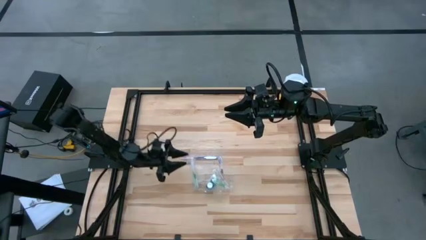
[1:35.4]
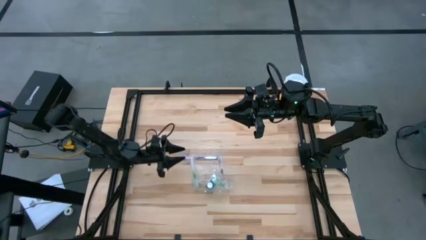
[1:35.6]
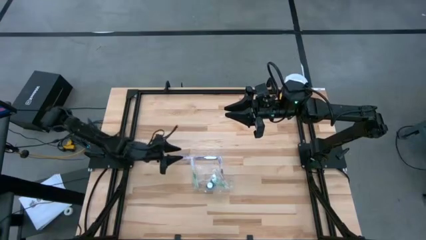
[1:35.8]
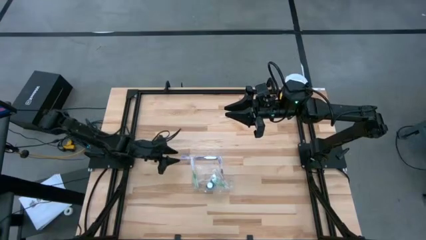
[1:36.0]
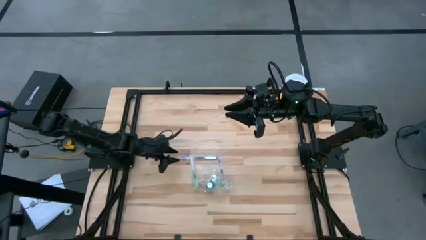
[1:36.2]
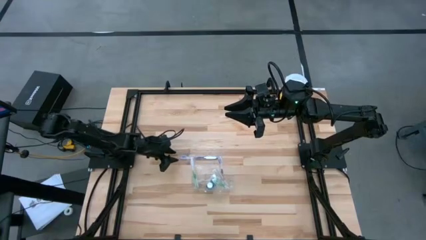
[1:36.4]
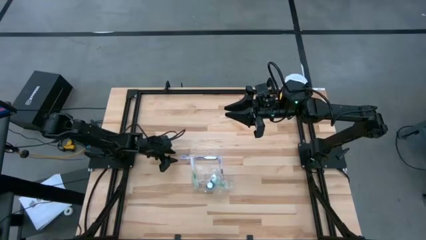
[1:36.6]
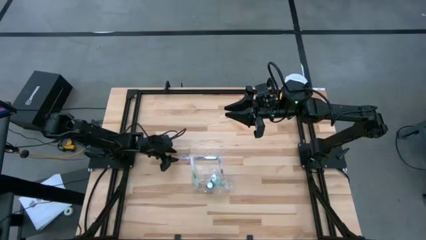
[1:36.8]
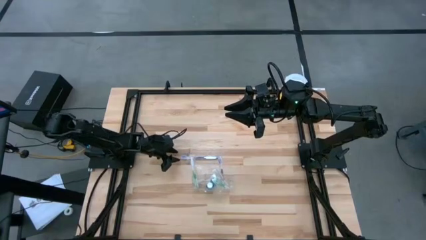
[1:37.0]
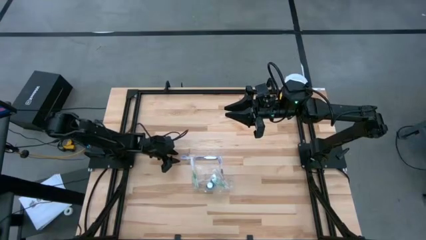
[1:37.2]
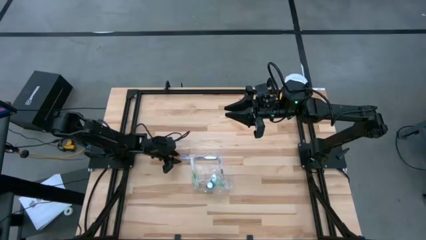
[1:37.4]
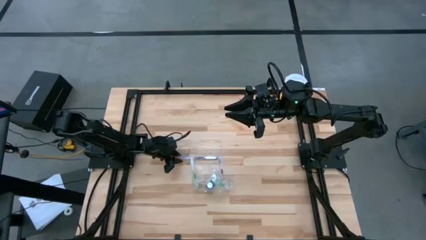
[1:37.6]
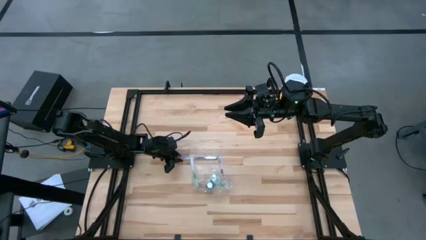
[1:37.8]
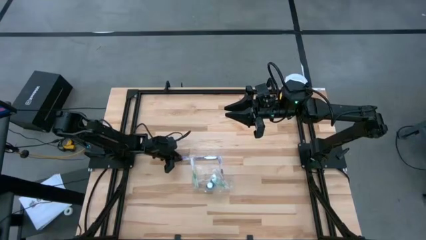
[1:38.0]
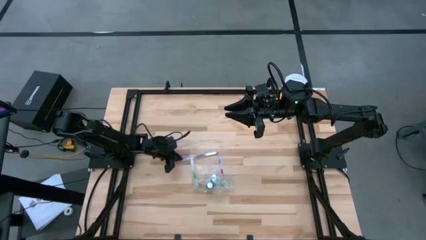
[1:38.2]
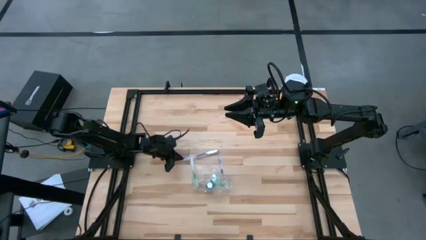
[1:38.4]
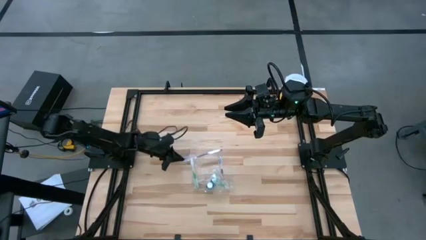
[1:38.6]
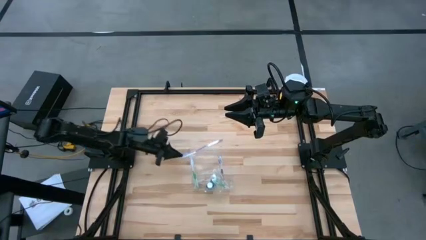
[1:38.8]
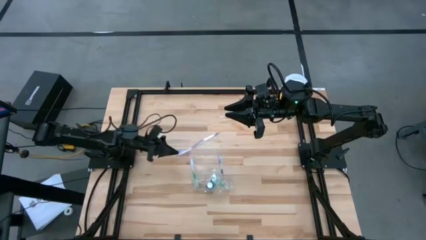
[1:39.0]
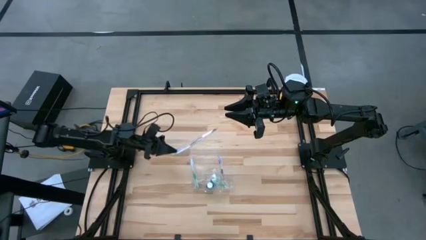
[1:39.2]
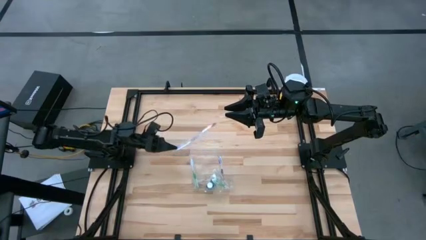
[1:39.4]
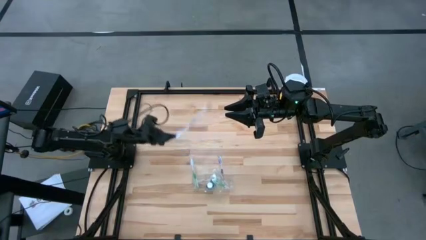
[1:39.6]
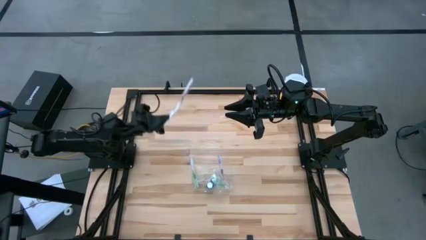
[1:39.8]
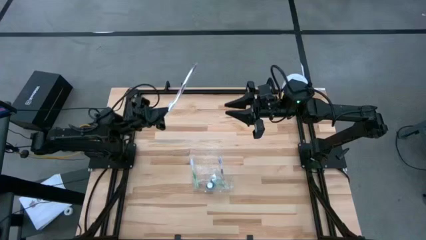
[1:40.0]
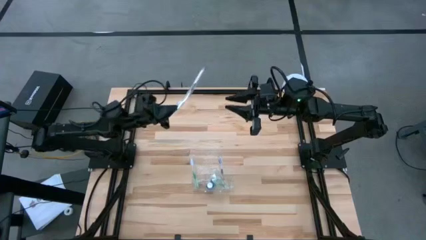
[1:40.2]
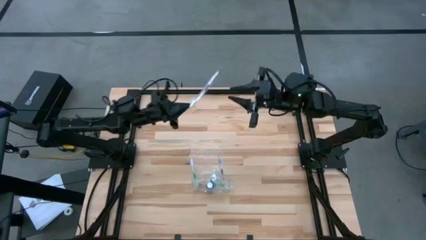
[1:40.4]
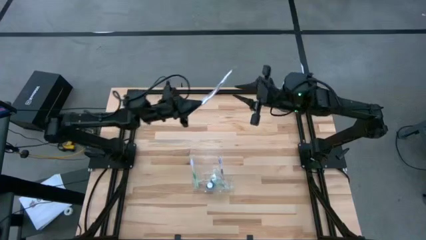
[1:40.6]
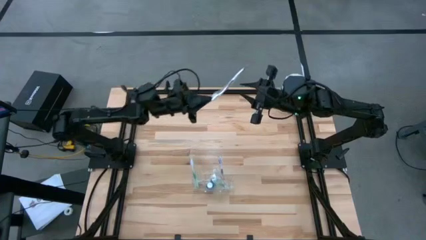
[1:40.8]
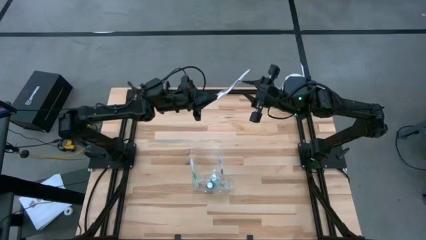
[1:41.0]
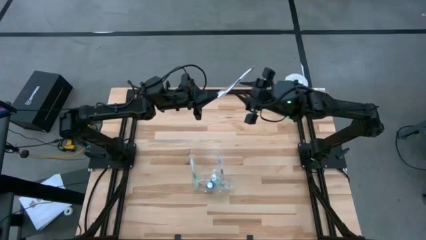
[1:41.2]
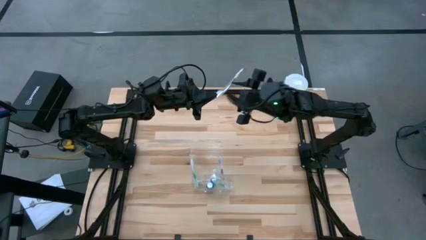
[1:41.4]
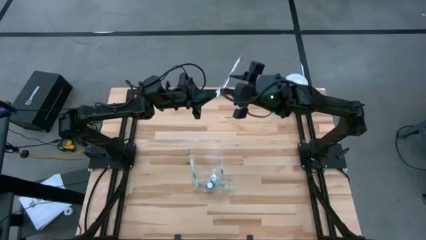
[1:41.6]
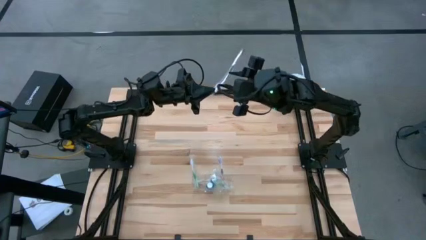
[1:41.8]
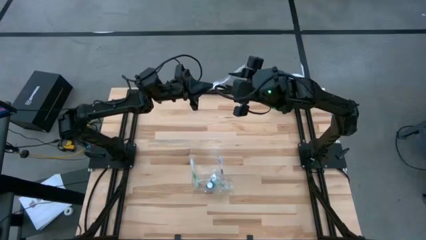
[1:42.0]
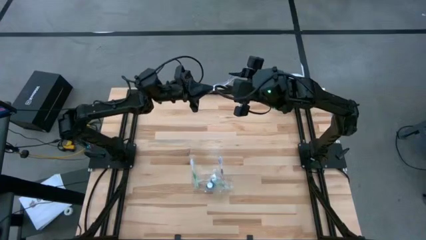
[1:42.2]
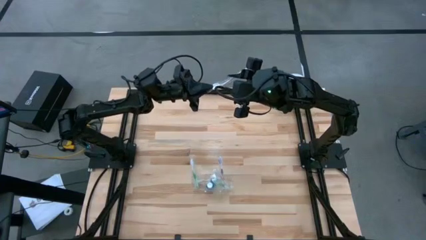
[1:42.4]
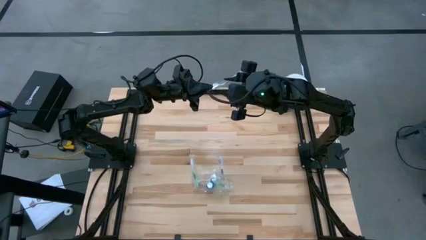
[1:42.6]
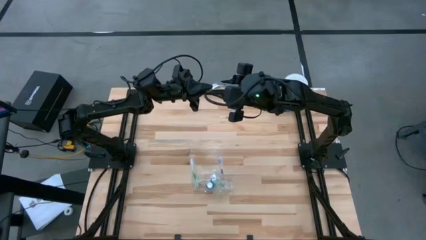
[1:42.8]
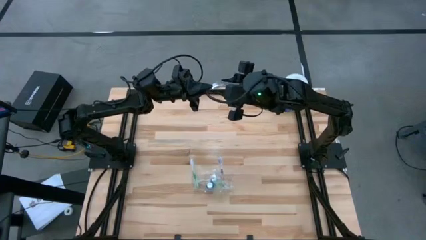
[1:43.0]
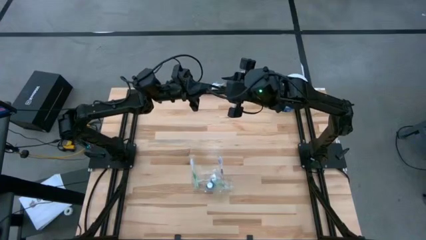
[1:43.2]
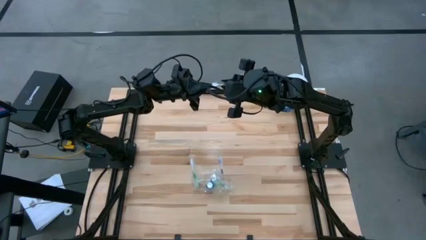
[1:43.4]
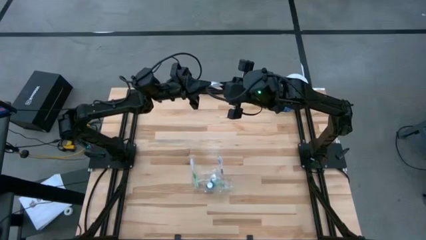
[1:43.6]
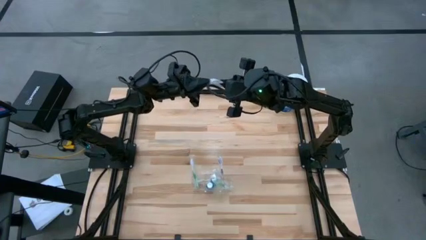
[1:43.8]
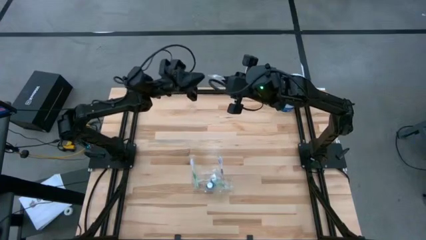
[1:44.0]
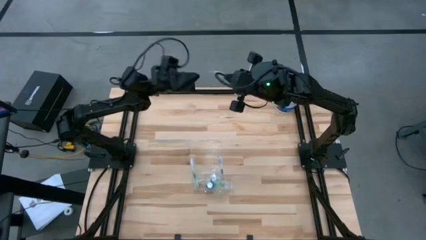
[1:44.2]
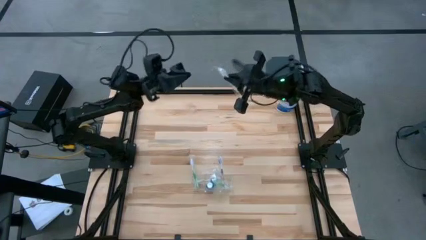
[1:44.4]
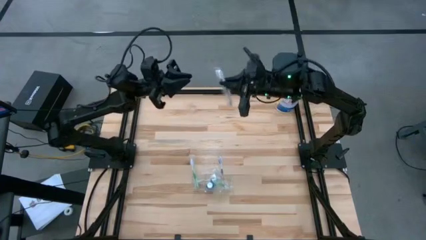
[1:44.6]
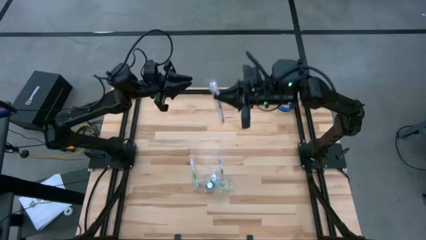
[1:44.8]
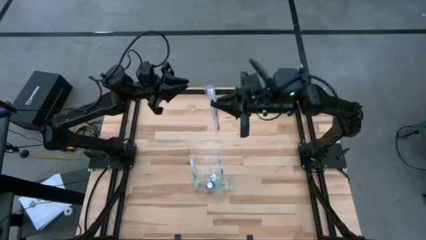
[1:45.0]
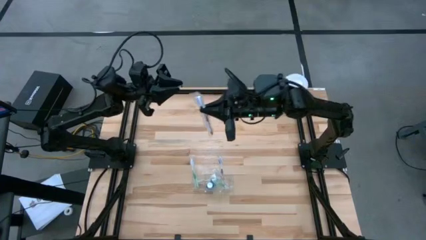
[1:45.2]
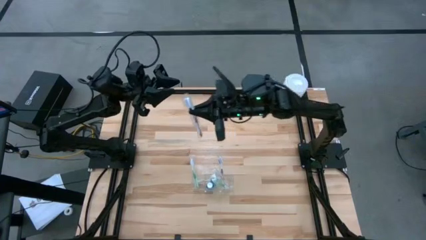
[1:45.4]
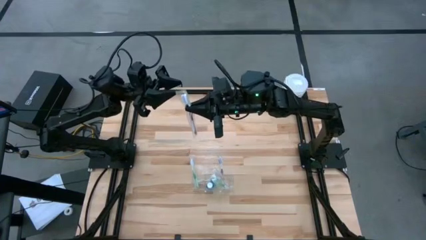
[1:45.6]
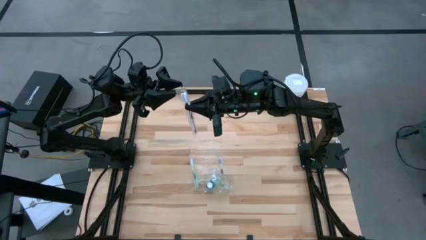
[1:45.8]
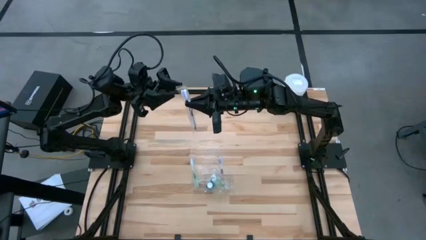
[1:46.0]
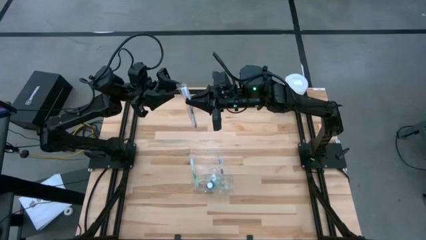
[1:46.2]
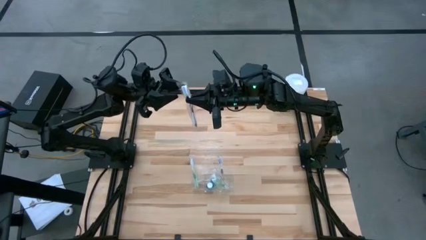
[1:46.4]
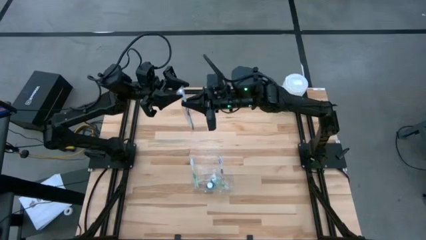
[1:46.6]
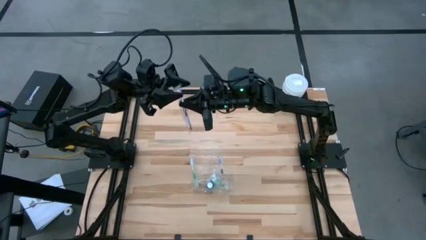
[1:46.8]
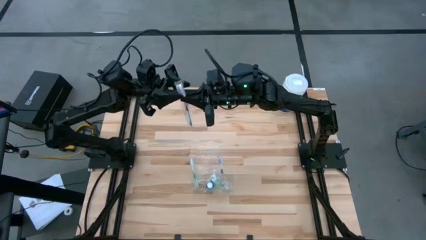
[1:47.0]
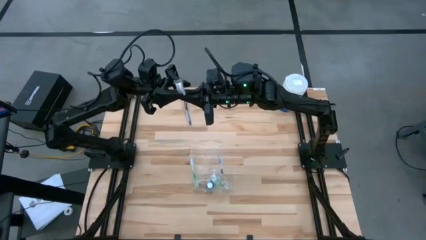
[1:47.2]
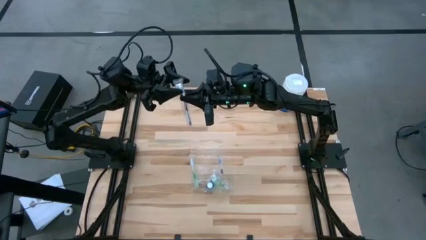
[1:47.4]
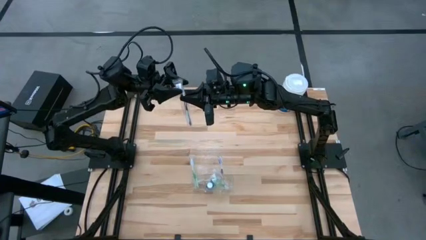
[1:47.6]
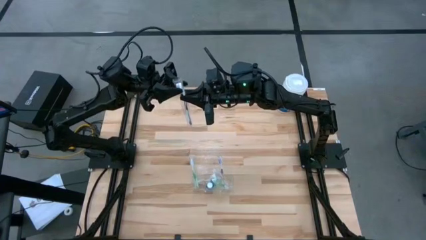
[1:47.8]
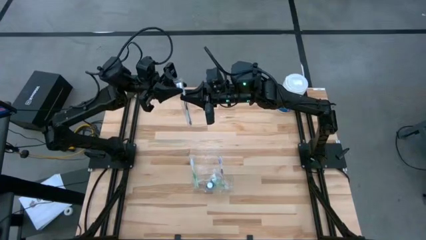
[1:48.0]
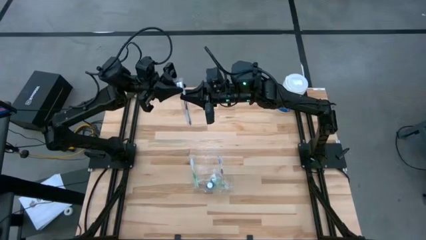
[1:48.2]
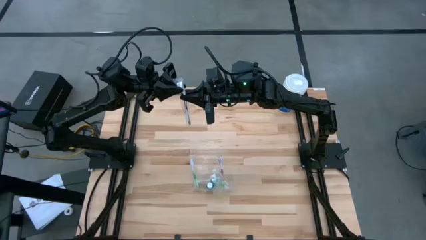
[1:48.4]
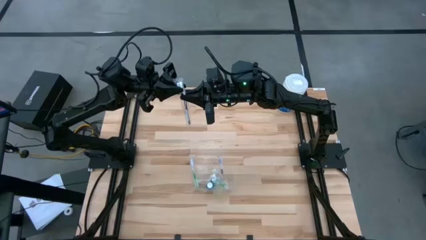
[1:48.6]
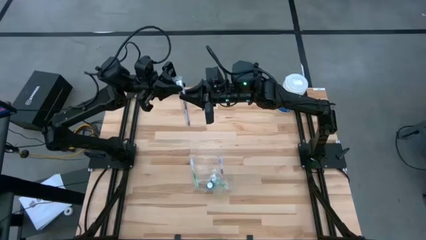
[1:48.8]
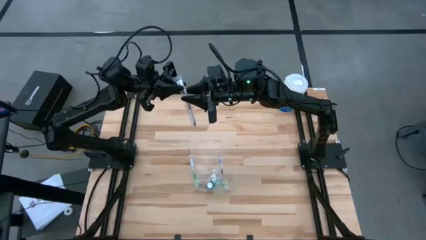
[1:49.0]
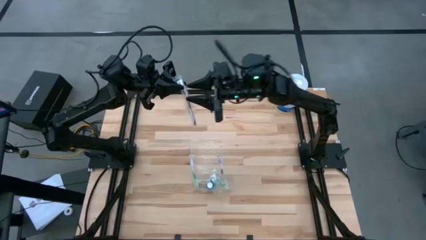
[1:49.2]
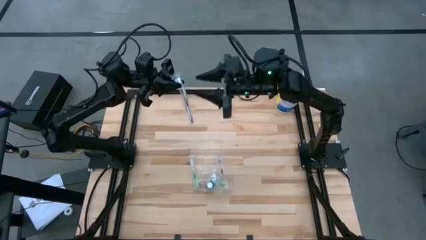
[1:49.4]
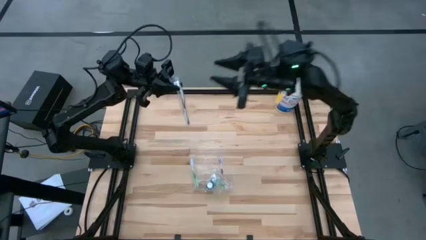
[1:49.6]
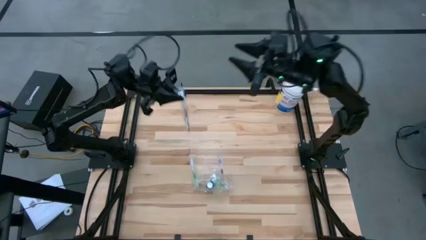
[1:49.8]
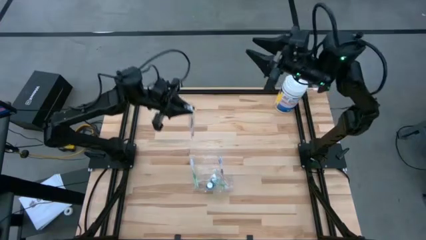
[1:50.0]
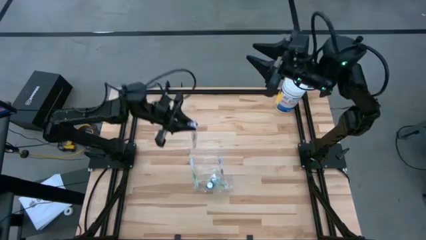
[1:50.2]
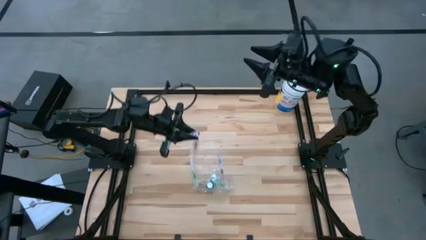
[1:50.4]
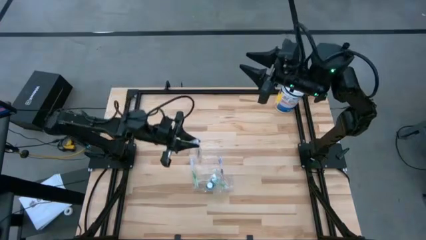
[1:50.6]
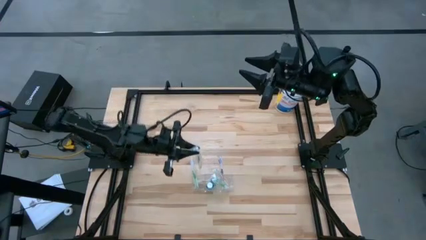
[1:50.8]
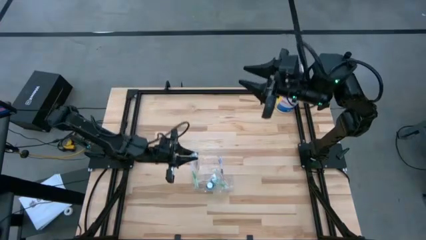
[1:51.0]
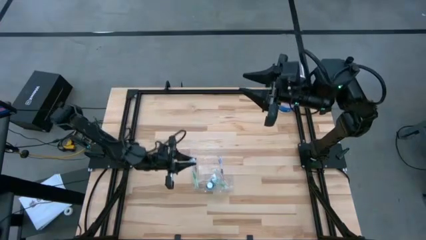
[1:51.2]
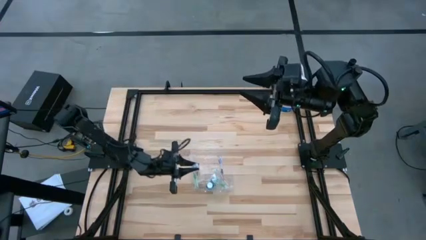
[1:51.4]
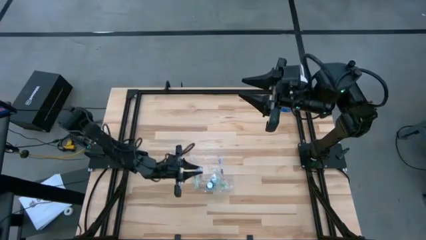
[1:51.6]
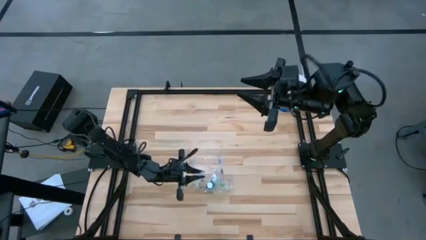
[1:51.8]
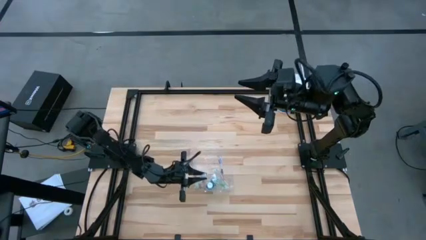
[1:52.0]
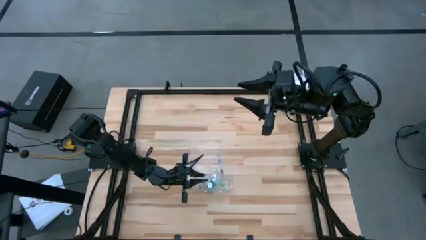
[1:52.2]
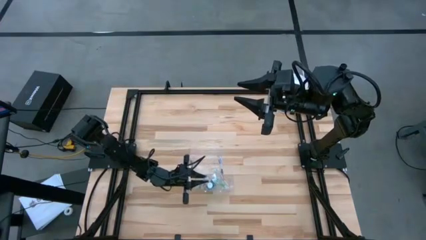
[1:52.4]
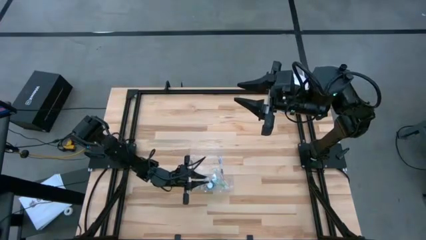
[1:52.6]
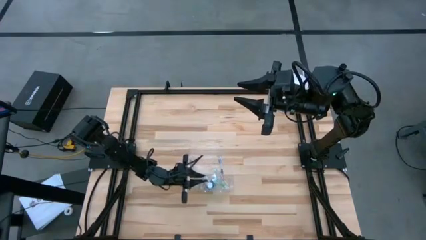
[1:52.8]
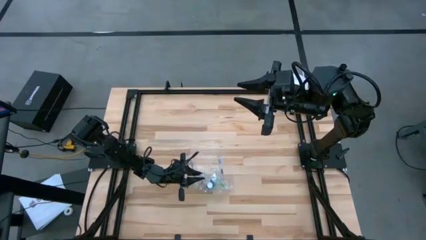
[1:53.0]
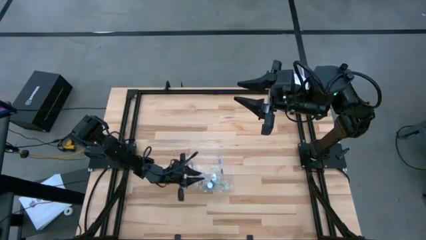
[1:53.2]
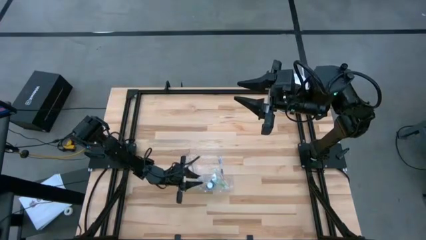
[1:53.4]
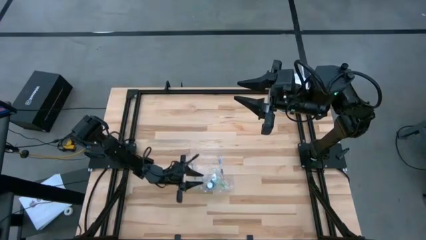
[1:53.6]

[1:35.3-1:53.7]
Task: Pick & Place toothbrushing station
Put the purple toothbrush into the center transparent organizer
